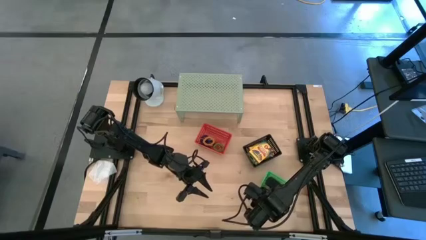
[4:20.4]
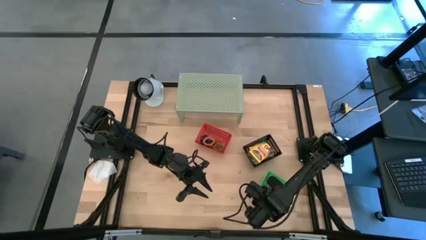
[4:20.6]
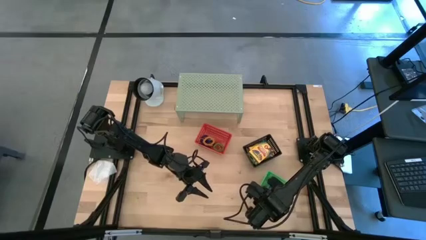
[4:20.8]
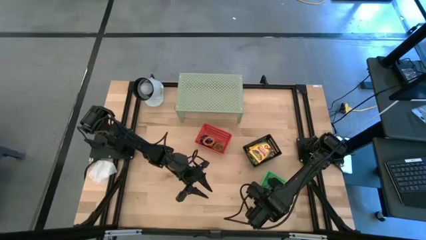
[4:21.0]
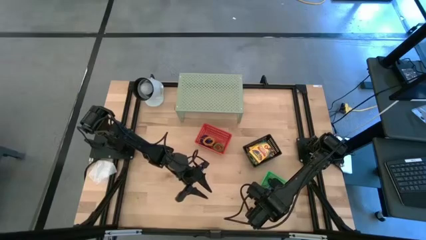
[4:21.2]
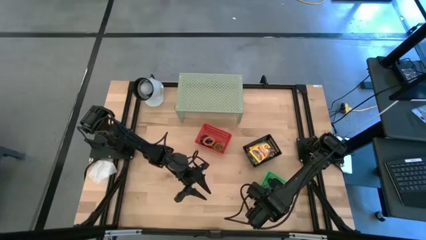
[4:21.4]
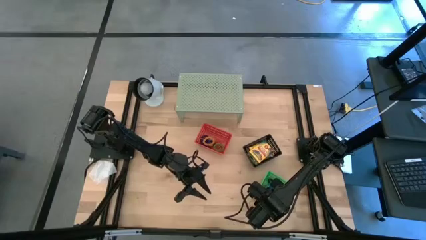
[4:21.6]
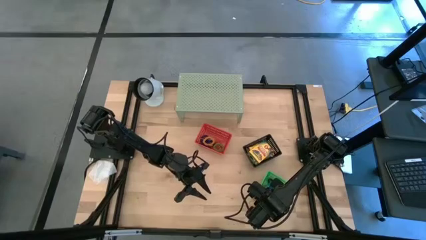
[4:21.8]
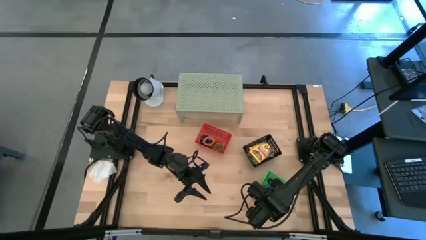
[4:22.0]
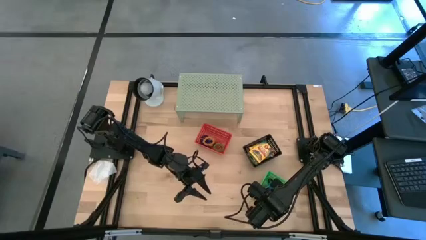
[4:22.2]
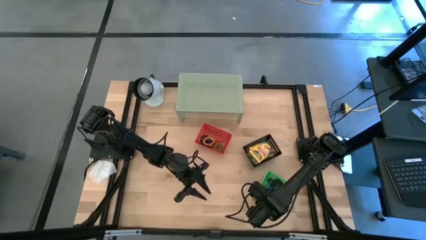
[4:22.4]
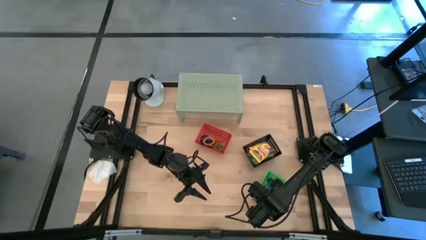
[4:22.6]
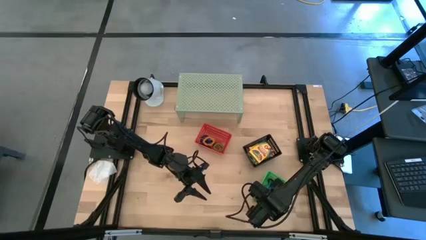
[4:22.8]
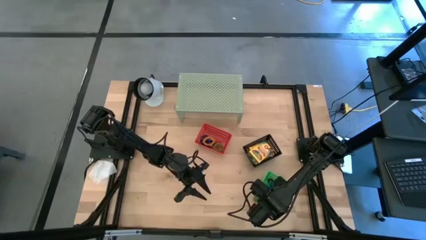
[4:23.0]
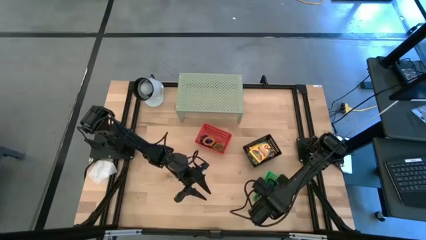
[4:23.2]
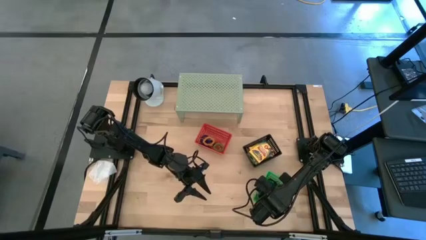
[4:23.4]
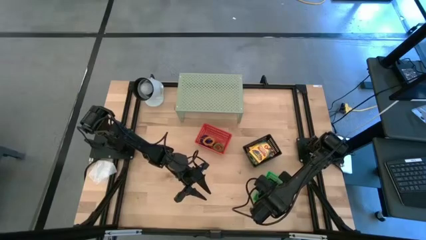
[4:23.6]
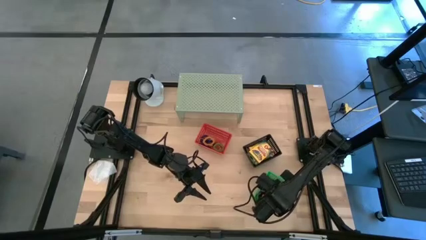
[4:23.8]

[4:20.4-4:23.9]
Task: Pick & Place Office Desk Supplies
Adjust the orange rubber band in the green bin

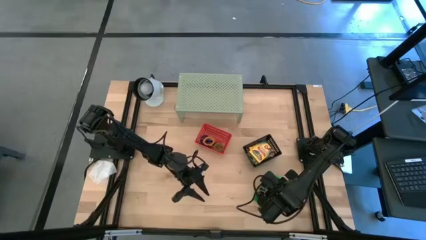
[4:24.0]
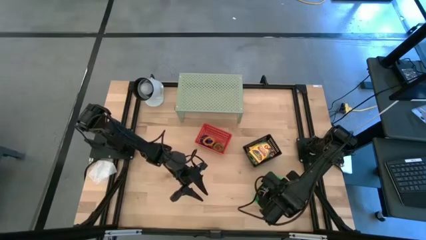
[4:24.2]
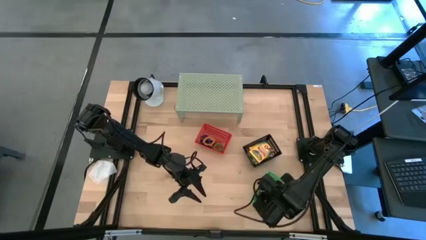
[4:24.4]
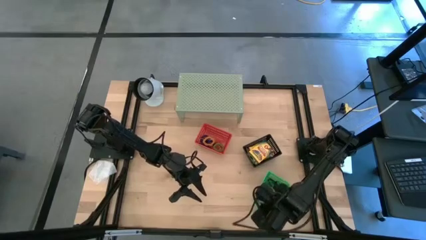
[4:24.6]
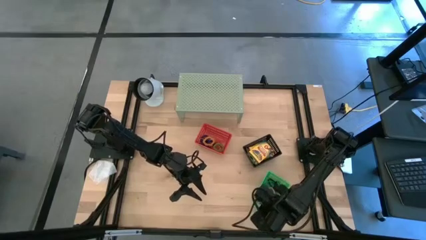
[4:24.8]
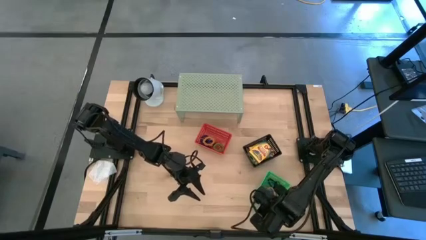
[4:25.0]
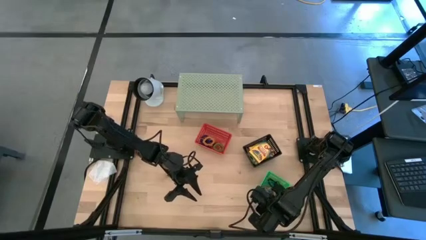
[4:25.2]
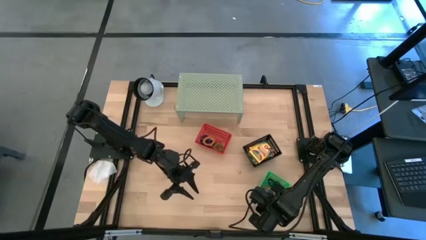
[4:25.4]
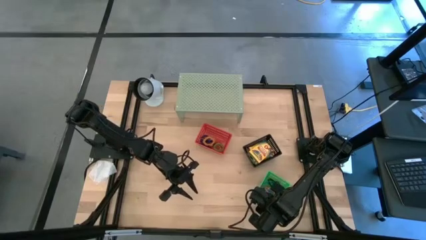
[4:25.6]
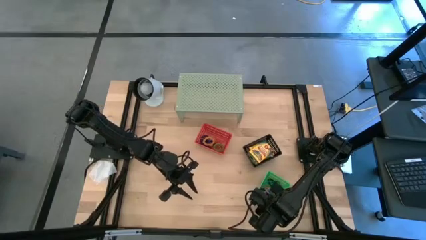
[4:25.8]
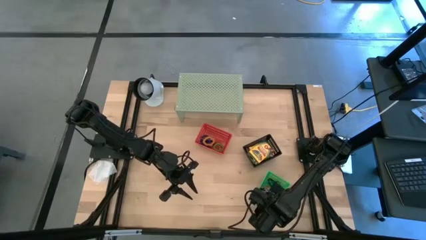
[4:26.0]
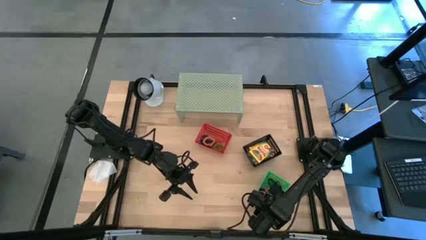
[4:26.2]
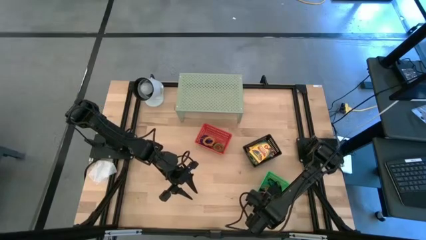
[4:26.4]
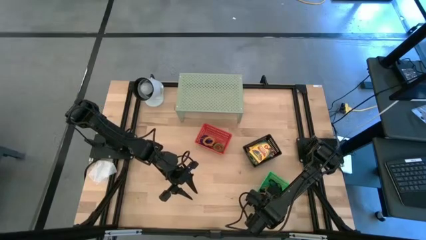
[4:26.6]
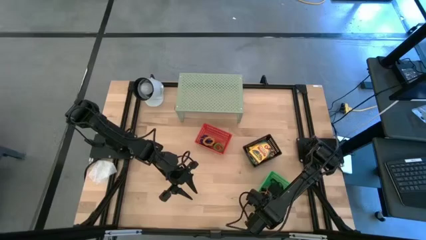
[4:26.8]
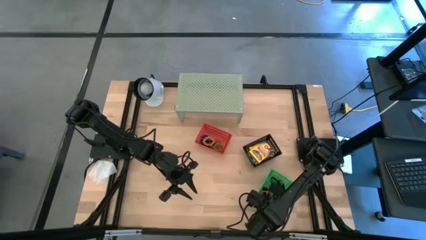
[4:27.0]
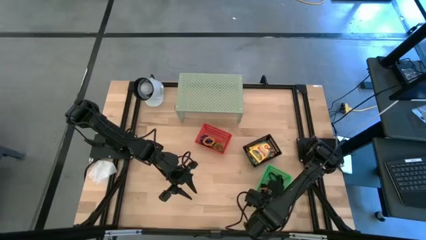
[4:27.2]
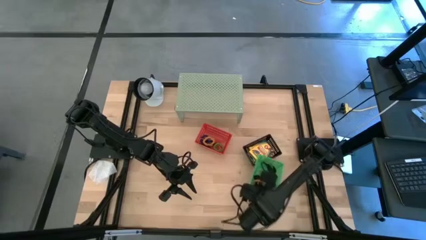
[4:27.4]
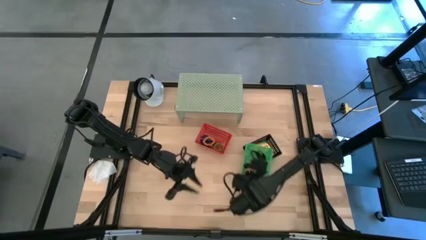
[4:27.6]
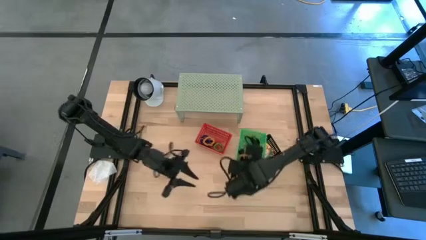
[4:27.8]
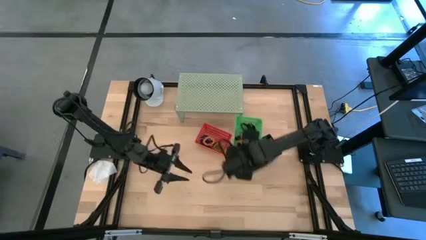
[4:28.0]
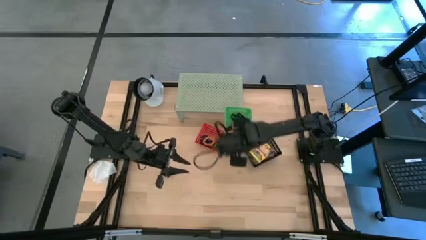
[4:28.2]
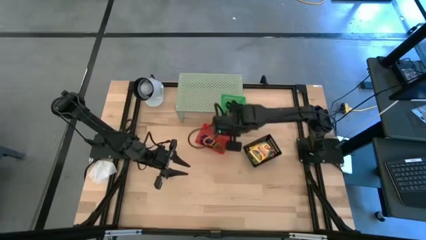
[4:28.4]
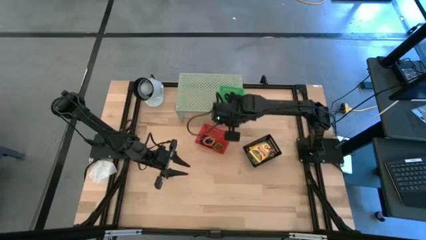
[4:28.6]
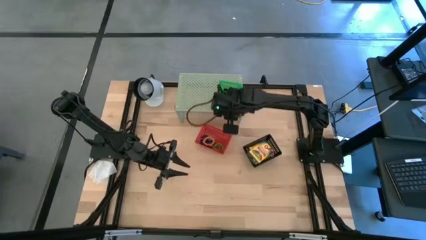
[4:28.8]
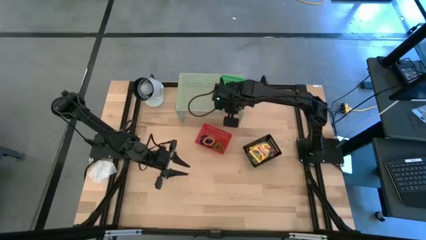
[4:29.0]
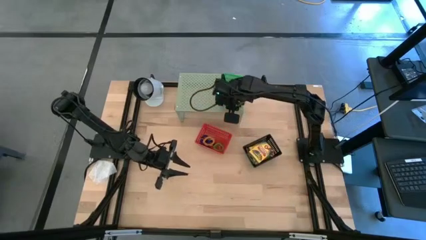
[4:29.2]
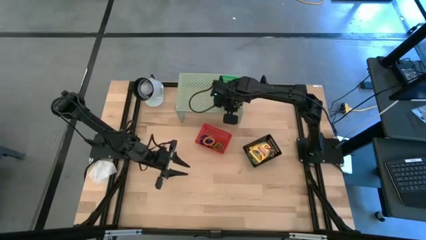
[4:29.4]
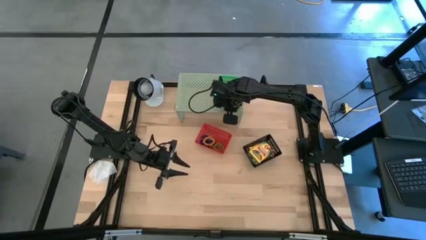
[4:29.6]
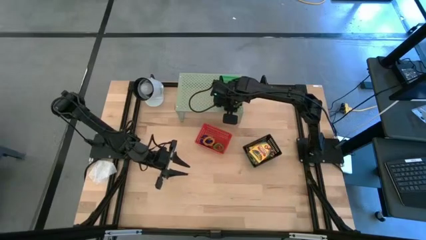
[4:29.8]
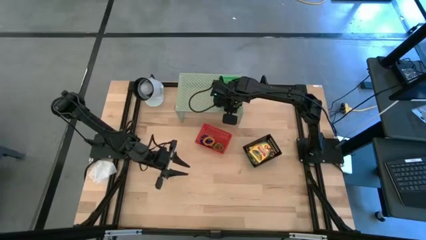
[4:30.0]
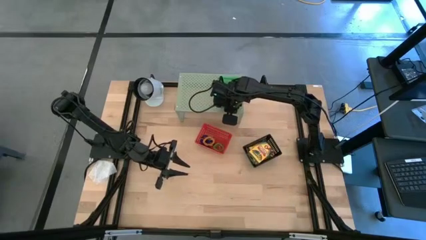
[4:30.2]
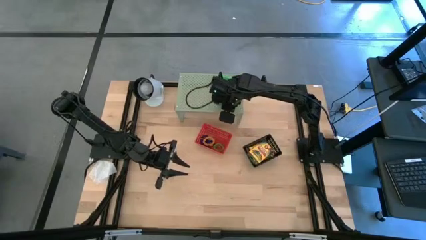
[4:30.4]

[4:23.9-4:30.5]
Put the green bin filled with rubber bands on the shelf
